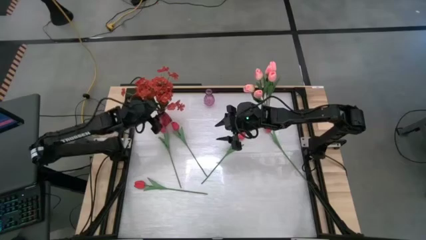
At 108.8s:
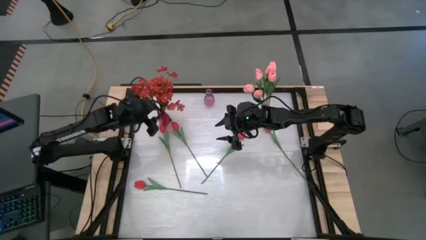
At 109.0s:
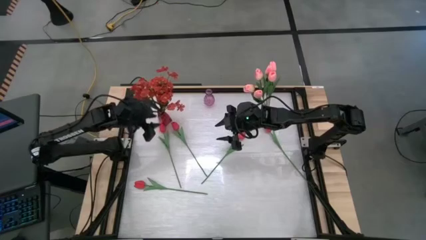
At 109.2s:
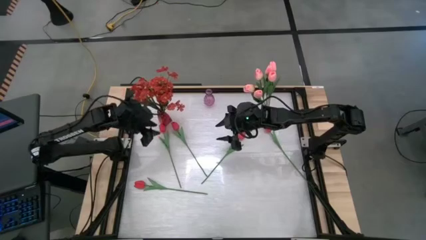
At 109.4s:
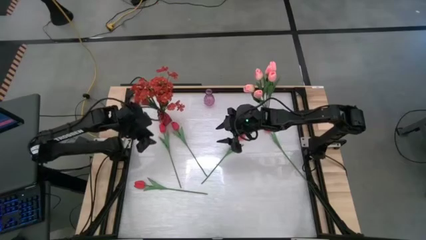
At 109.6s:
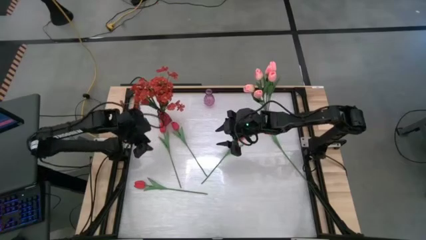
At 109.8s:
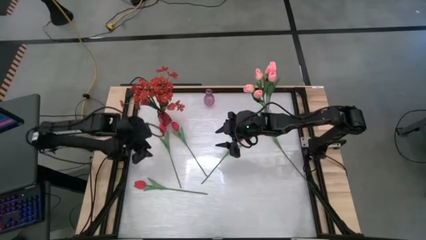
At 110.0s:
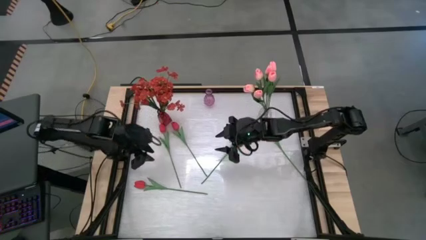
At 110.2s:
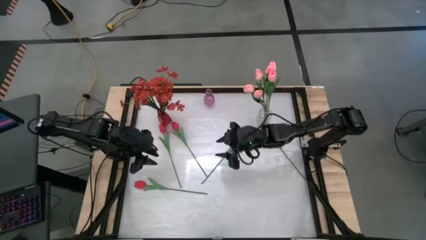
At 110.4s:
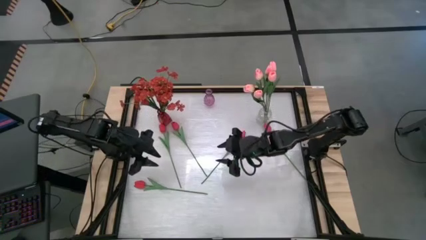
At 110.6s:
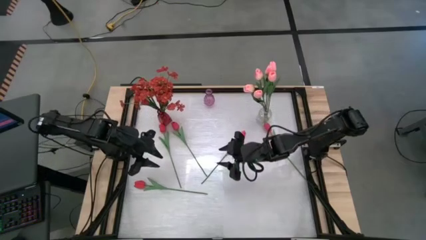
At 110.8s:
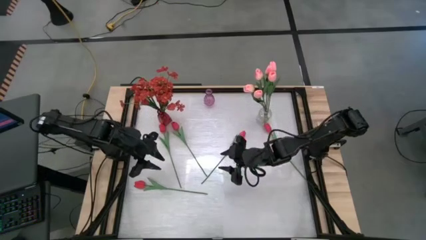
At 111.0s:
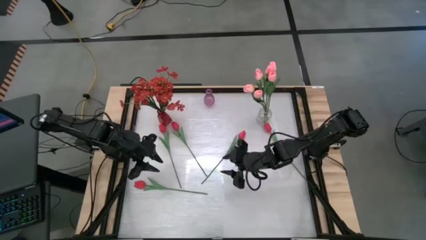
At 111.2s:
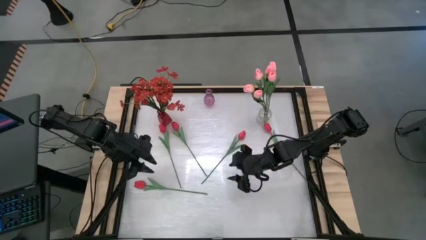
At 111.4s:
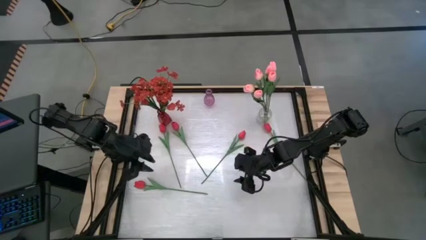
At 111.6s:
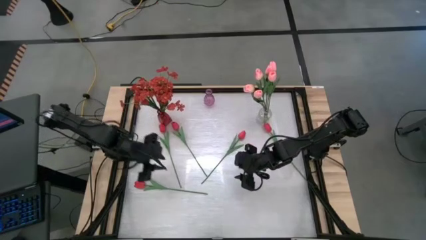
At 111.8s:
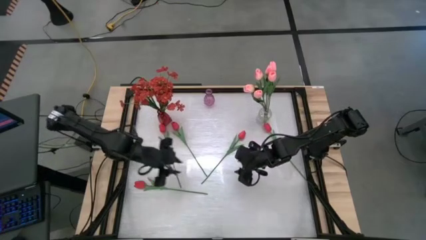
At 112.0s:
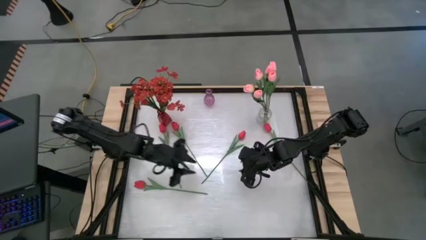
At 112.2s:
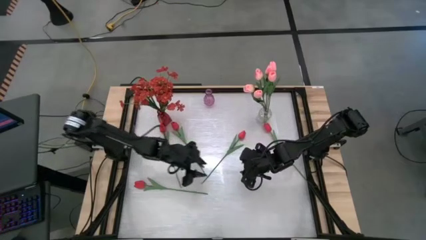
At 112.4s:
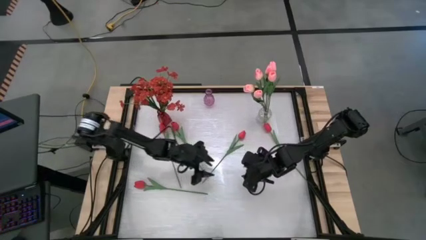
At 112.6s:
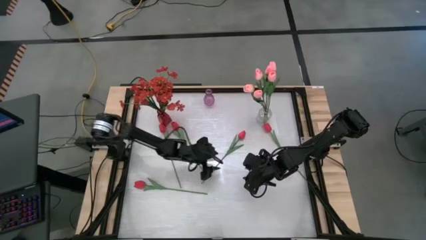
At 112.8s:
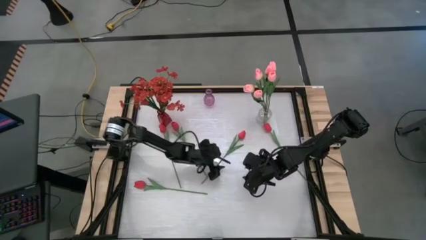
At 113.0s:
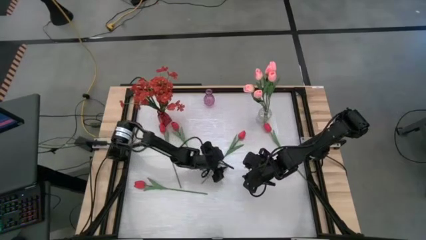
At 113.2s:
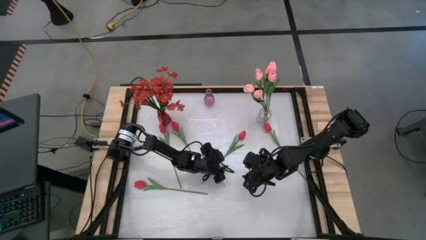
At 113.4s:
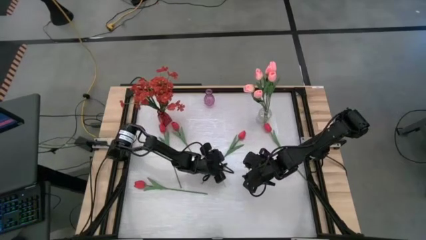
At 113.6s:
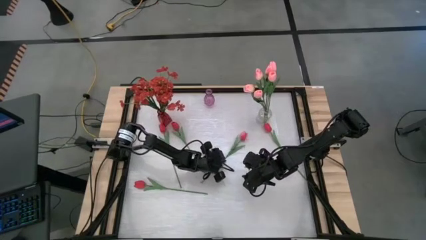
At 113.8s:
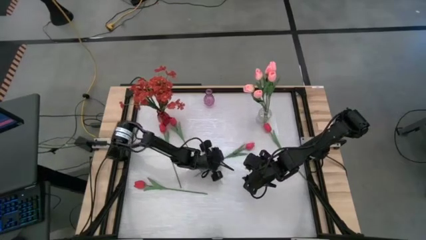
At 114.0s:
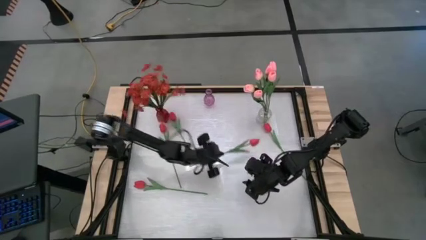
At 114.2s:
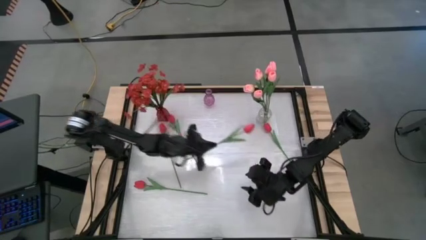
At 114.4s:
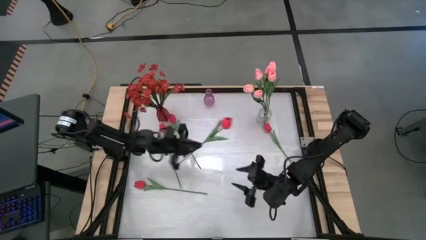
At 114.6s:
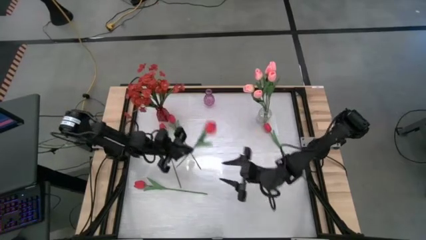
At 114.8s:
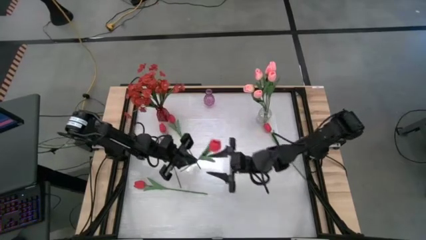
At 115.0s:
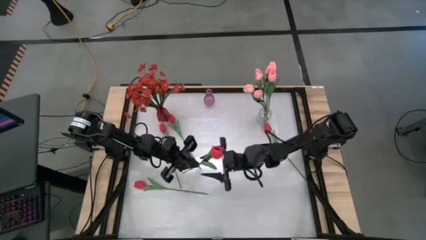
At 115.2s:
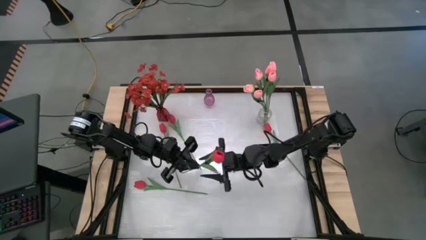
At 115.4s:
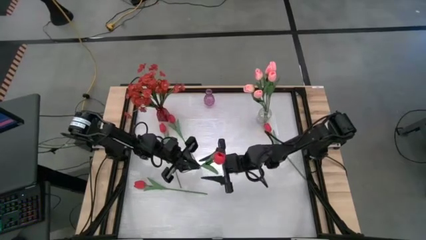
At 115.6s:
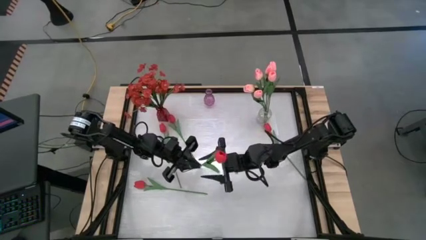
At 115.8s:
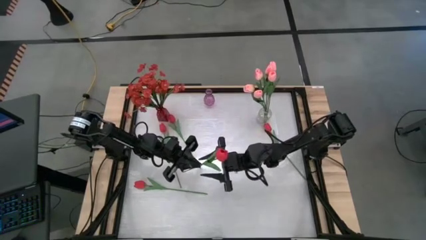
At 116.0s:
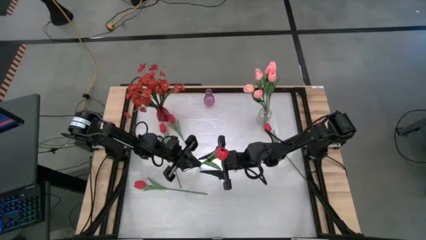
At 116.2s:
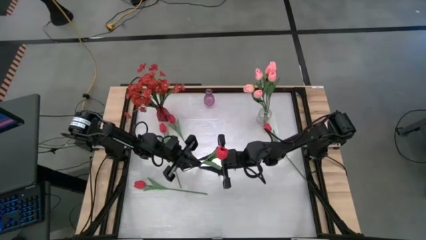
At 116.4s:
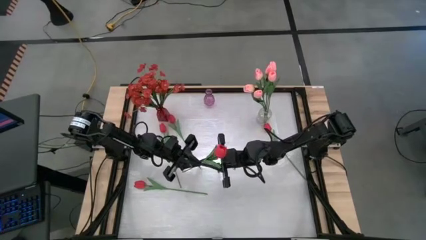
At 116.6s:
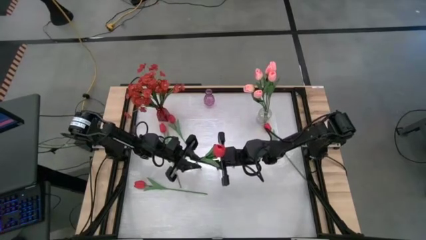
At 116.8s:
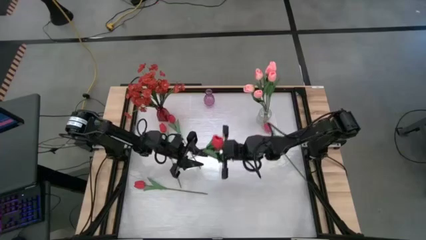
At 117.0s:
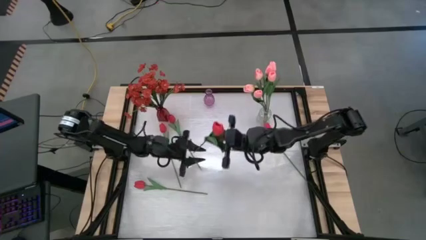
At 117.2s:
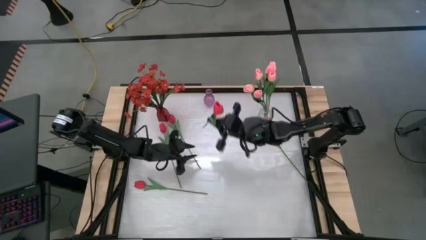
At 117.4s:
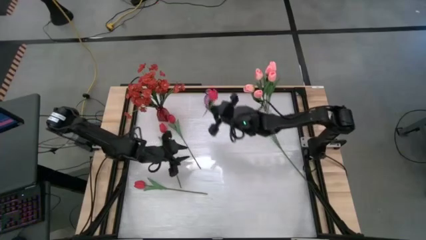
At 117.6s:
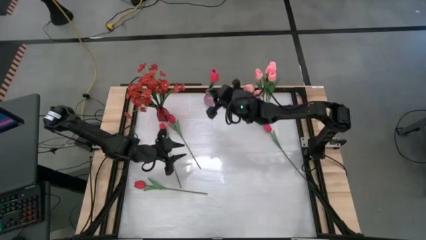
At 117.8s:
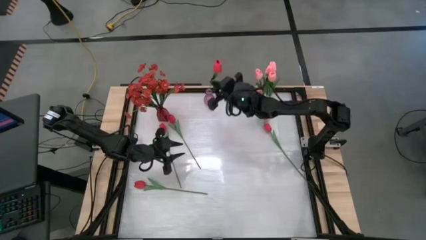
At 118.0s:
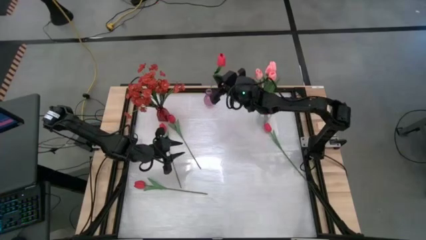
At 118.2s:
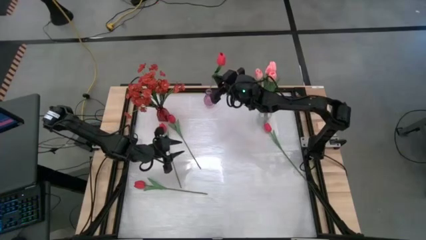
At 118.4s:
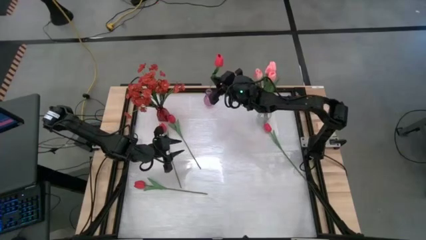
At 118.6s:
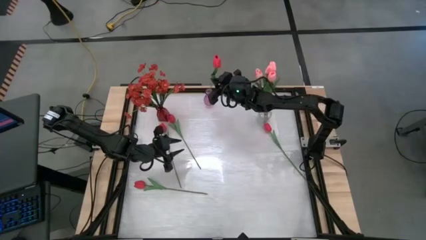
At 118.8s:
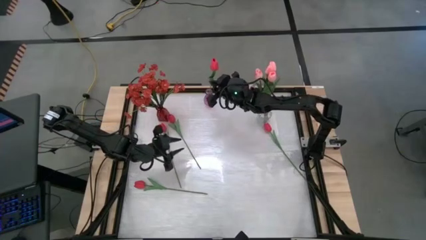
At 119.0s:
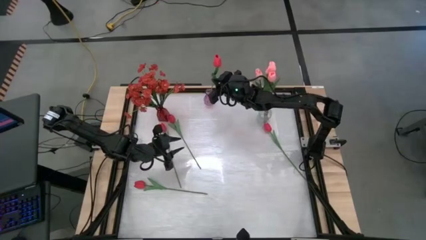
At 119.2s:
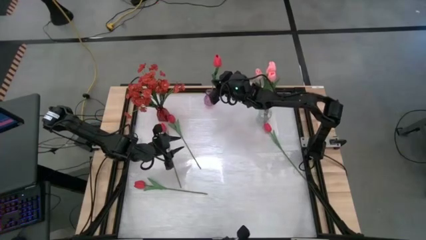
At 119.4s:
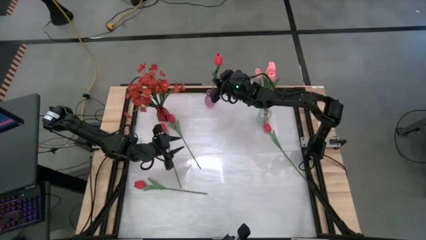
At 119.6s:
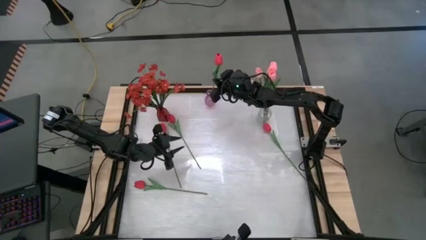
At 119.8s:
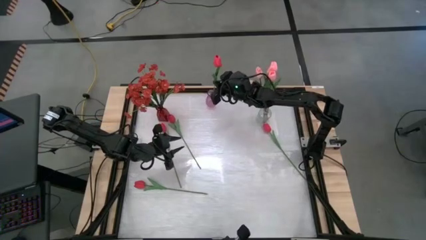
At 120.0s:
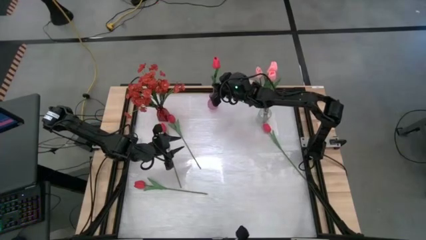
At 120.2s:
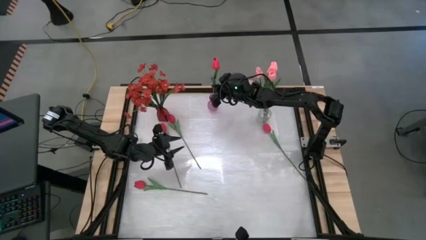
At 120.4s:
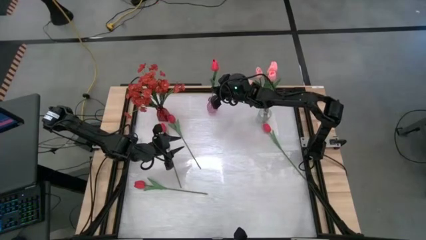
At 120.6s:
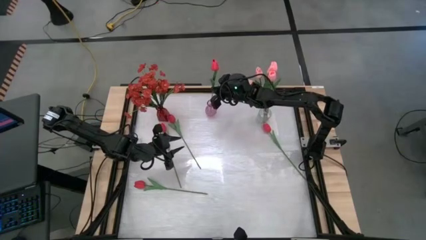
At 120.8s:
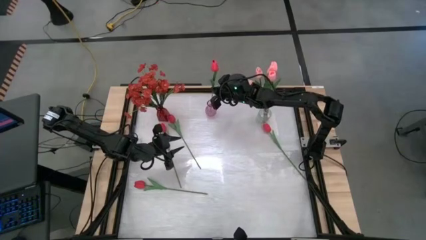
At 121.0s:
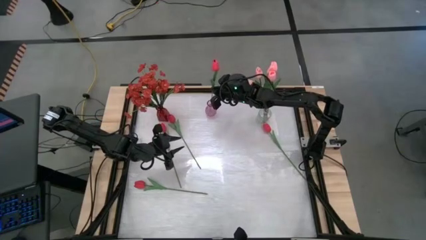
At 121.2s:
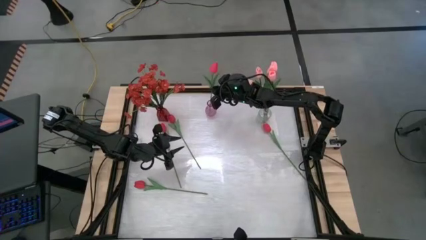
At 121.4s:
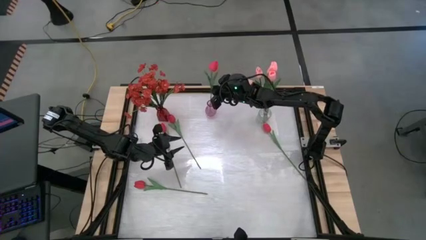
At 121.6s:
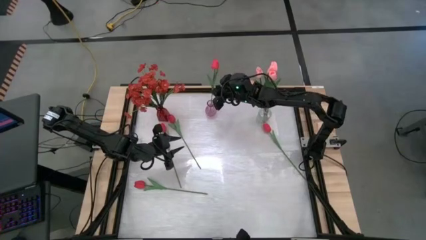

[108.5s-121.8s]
Task: Sort flowers into vase by color
Put the top middle red tulip into the purple vase

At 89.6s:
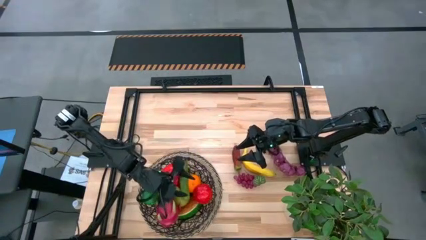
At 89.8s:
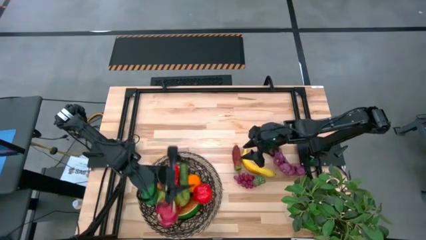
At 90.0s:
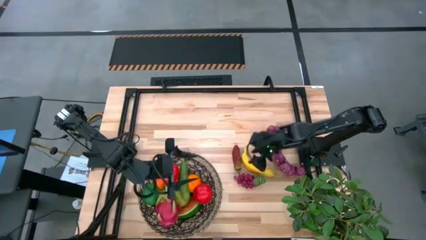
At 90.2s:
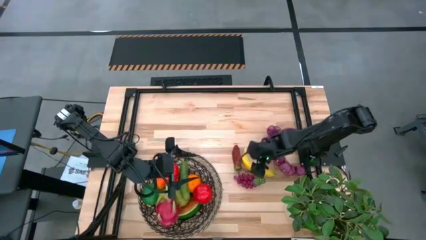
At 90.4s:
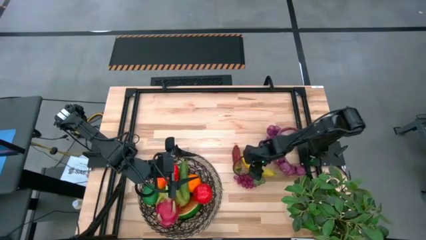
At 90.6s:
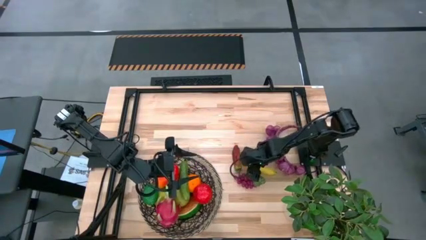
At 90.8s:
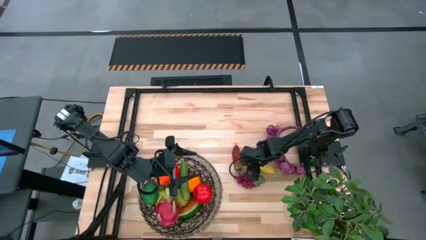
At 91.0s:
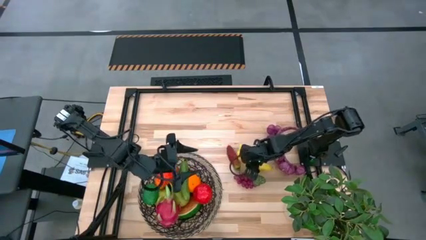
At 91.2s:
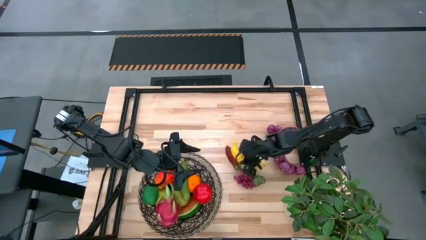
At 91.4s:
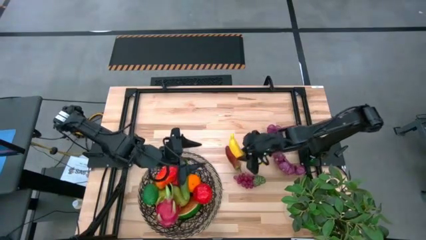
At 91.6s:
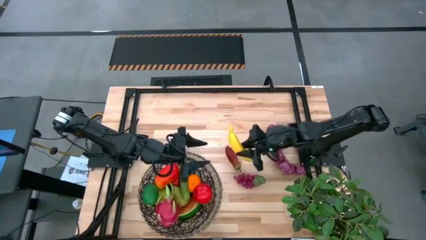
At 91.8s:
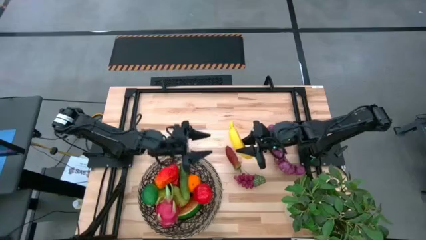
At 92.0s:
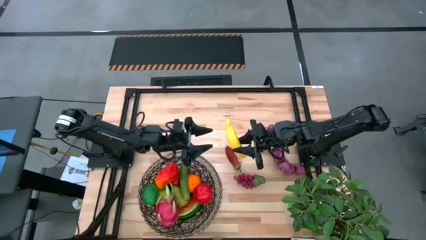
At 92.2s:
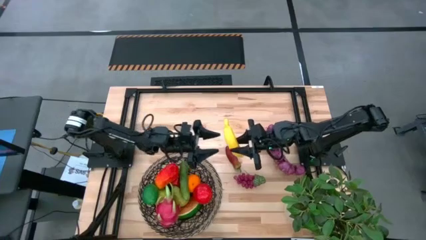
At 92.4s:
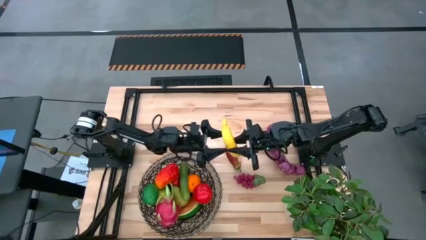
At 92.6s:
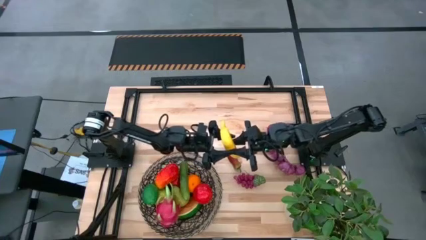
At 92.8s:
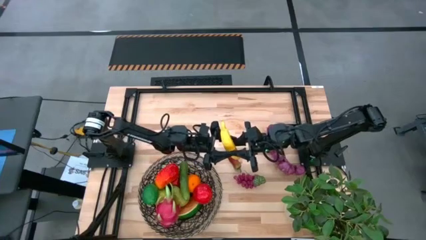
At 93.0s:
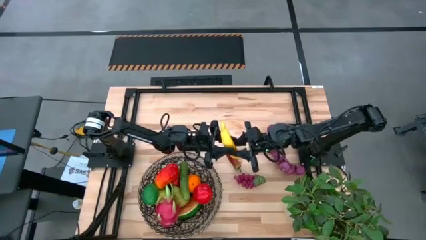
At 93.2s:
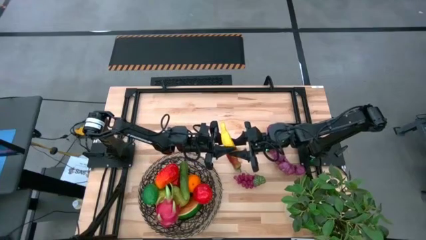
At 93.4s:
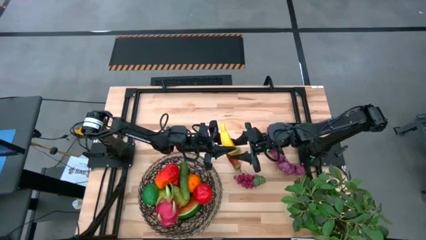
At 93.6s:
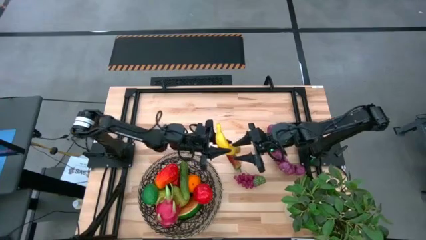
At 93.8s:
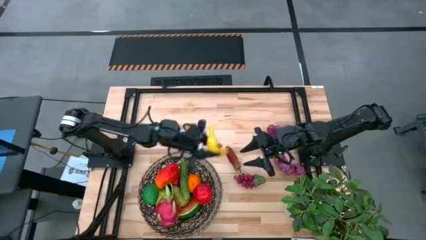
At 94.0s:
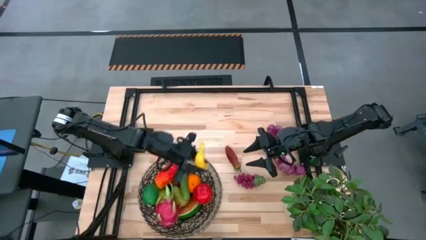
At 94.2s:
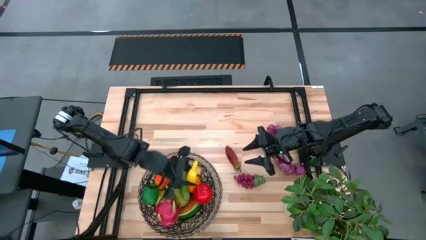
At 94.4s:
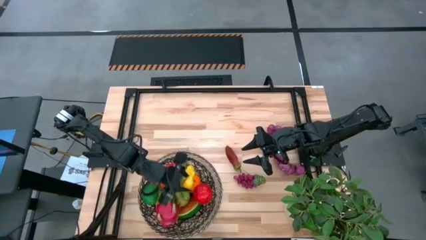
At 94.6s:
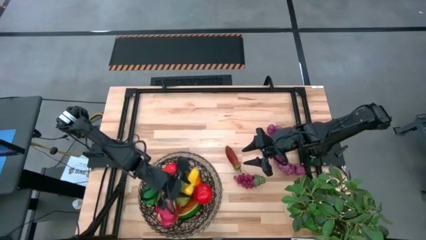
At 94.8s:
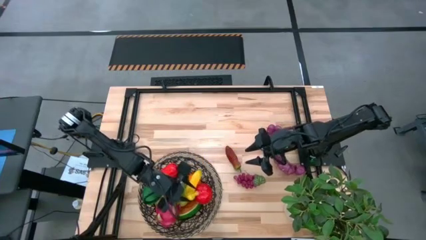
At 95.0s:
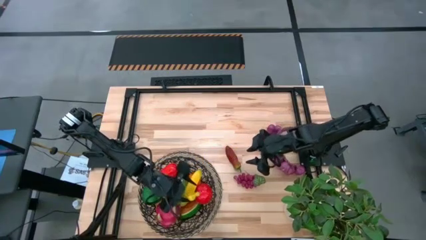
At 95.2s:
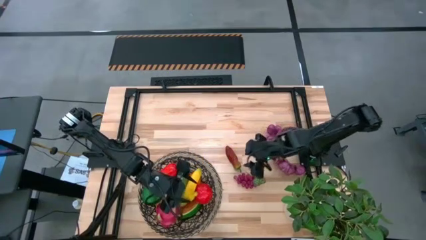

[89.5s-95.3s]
Task: Build produce basket
Put the banana into the woven basket
